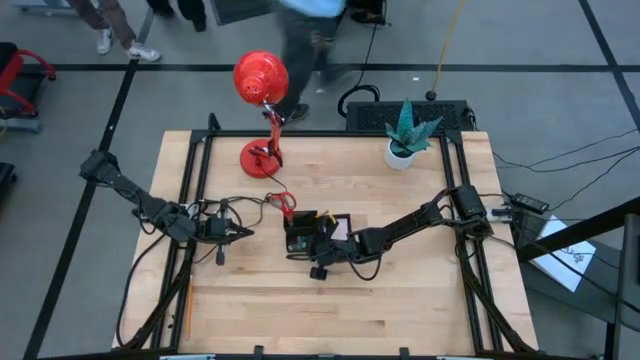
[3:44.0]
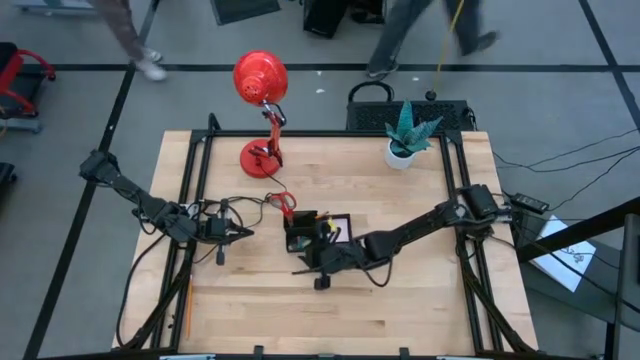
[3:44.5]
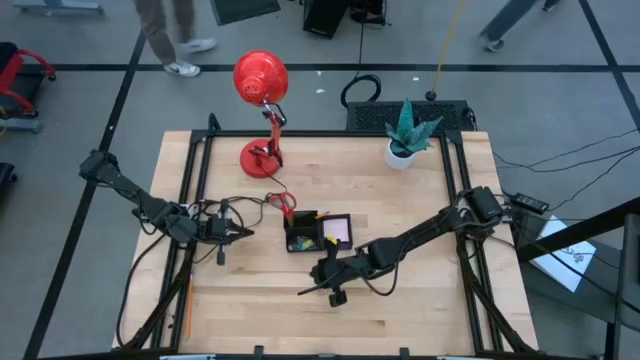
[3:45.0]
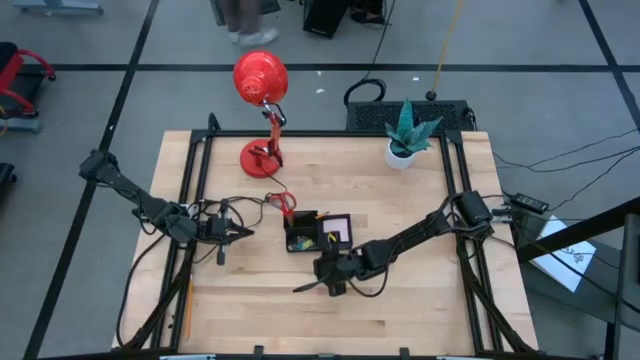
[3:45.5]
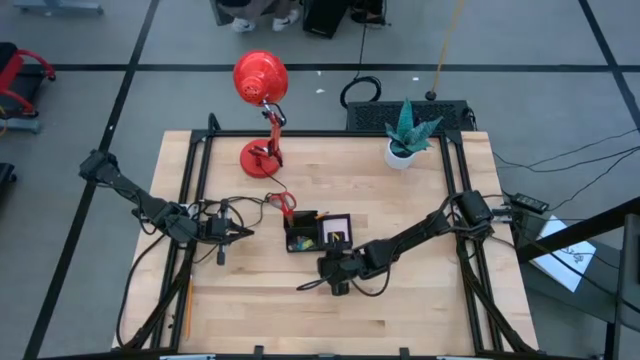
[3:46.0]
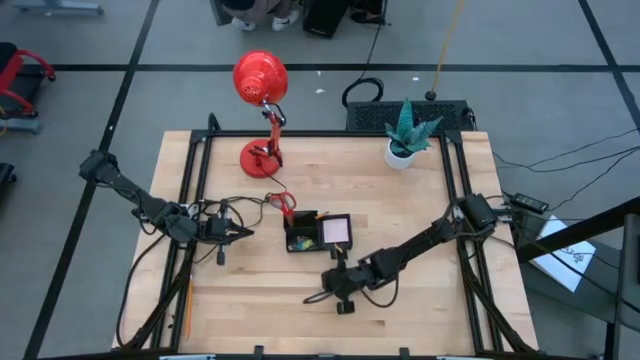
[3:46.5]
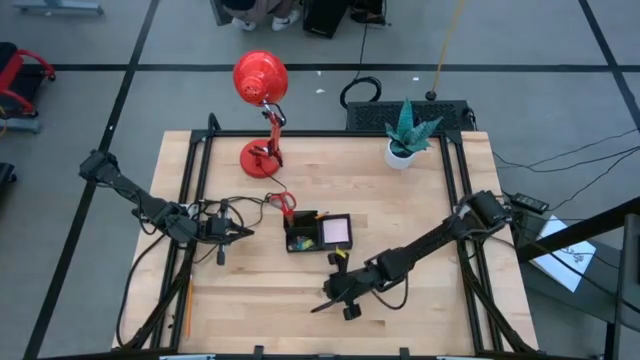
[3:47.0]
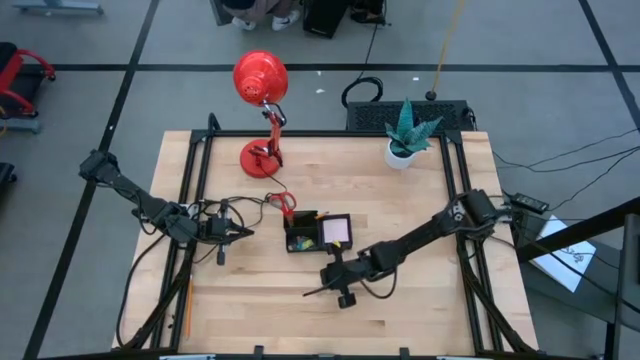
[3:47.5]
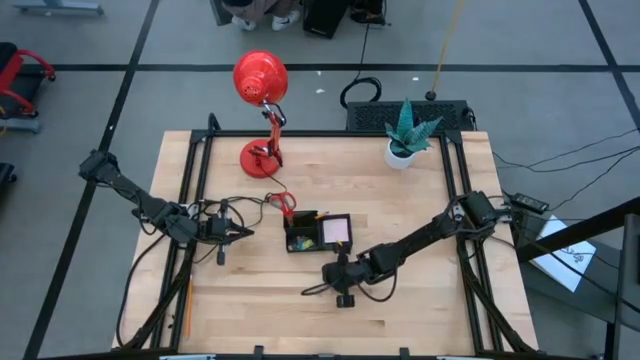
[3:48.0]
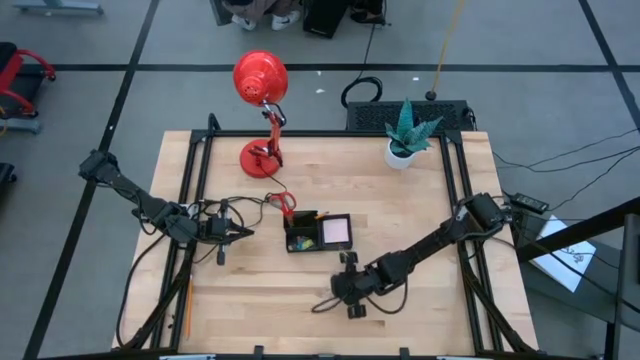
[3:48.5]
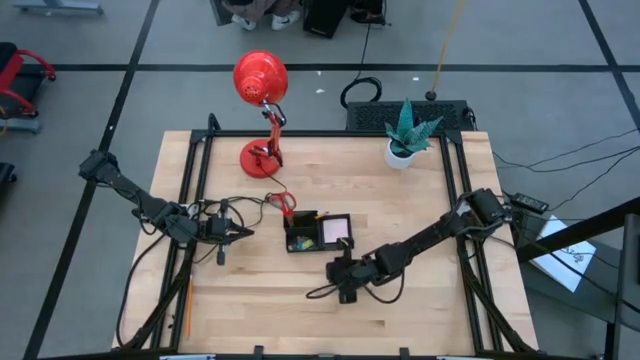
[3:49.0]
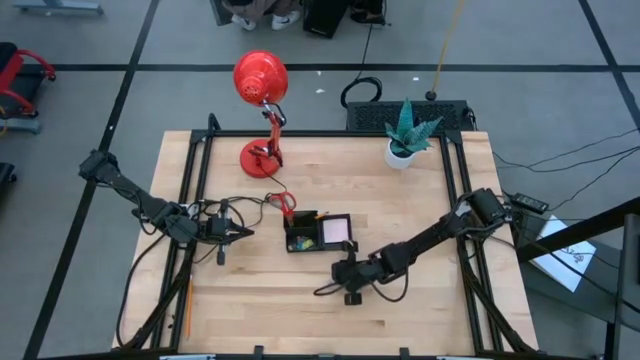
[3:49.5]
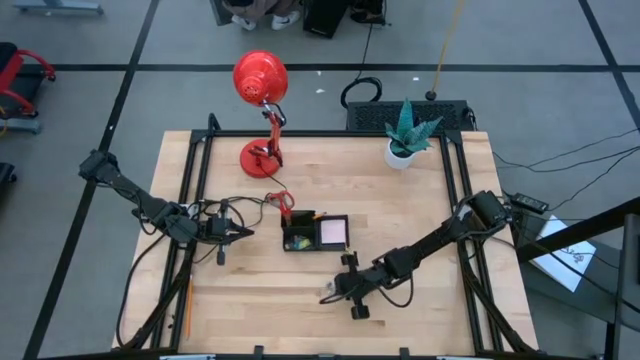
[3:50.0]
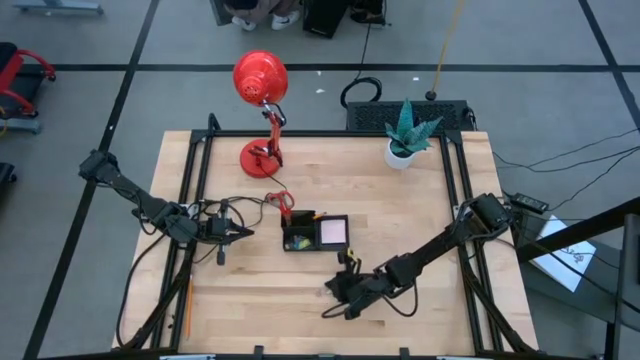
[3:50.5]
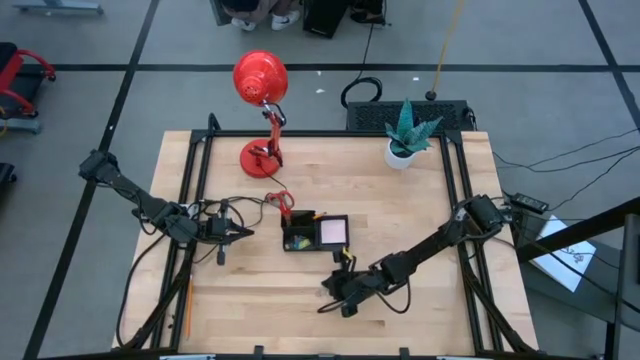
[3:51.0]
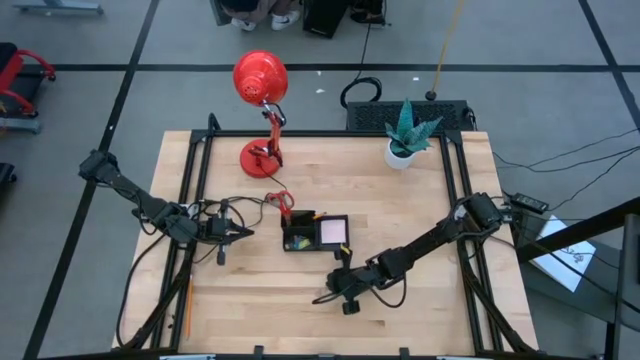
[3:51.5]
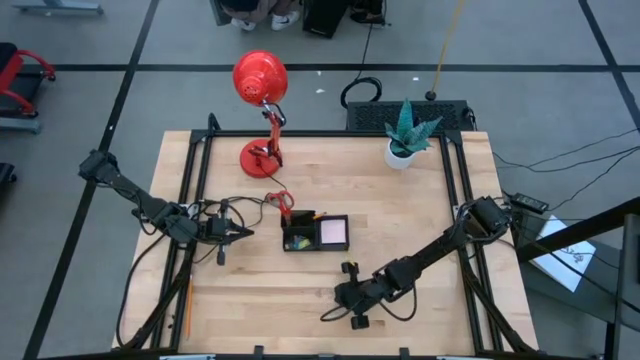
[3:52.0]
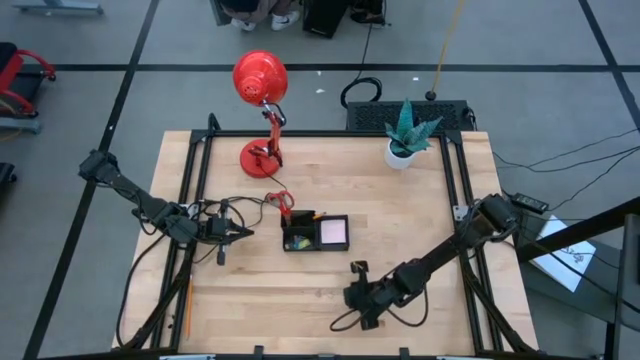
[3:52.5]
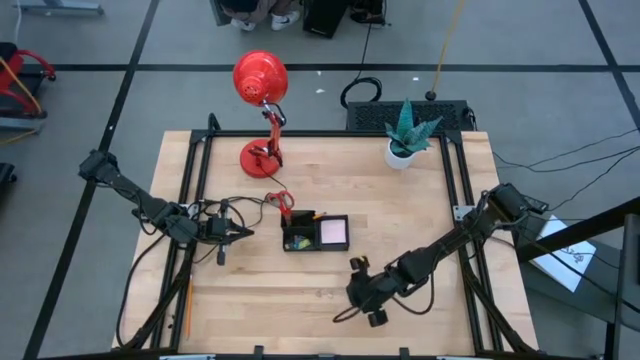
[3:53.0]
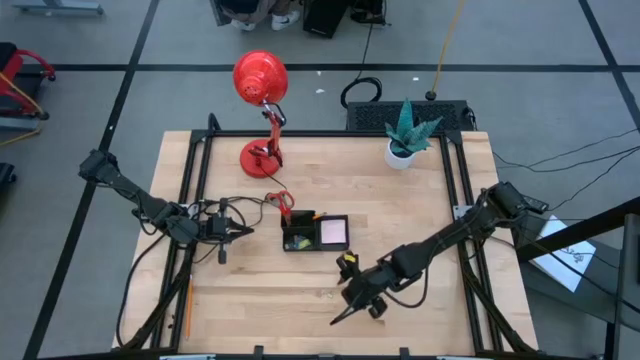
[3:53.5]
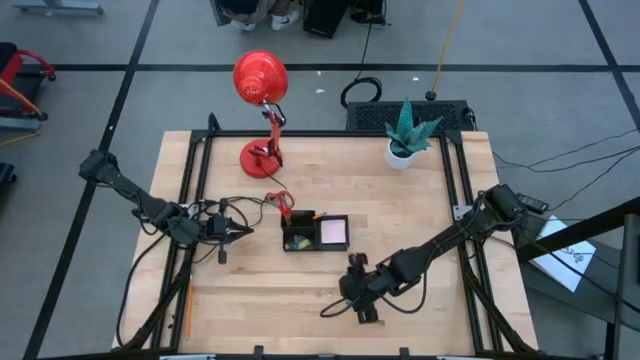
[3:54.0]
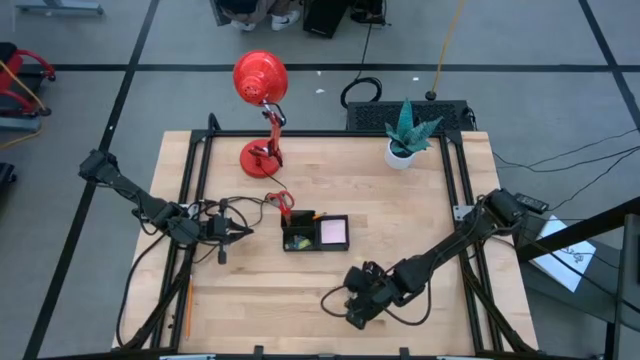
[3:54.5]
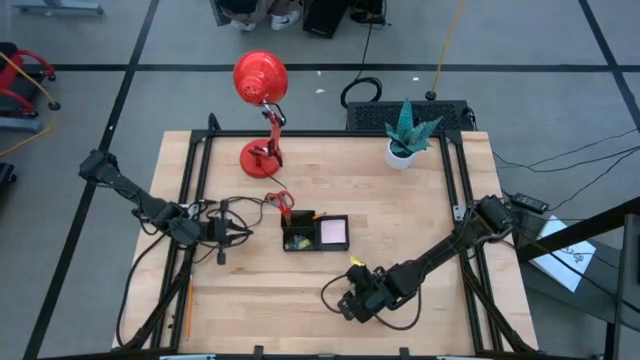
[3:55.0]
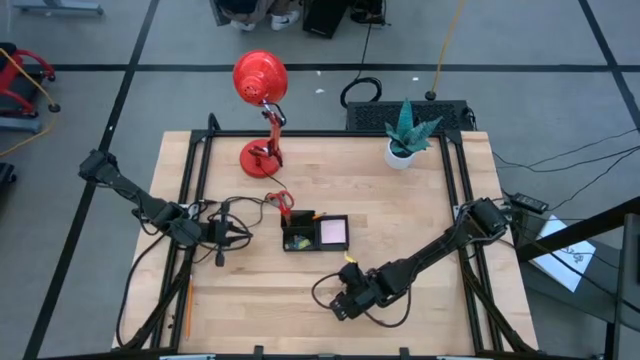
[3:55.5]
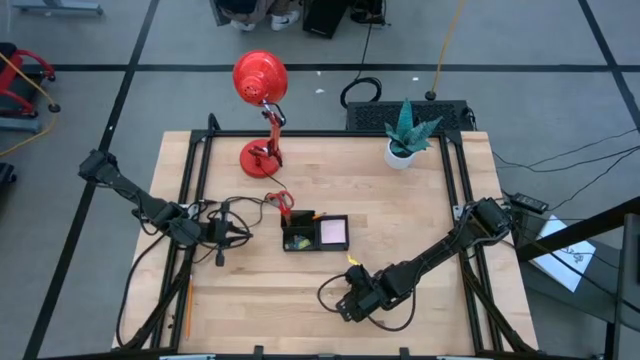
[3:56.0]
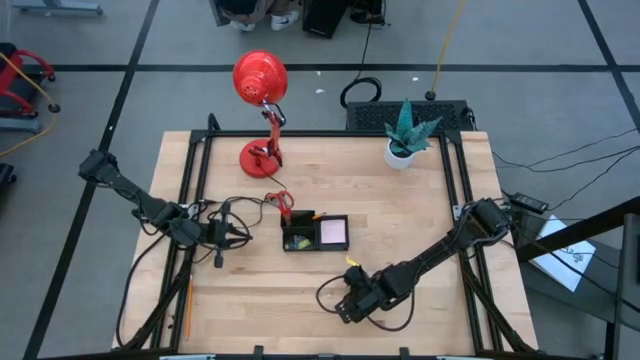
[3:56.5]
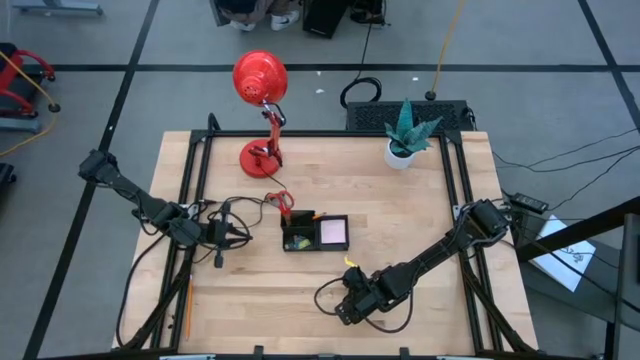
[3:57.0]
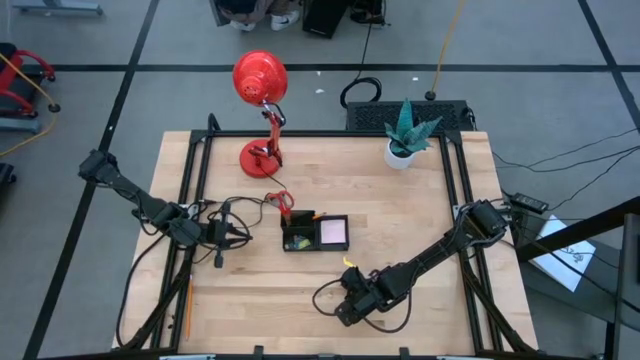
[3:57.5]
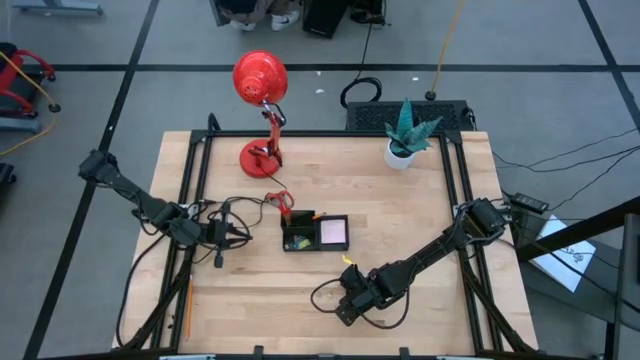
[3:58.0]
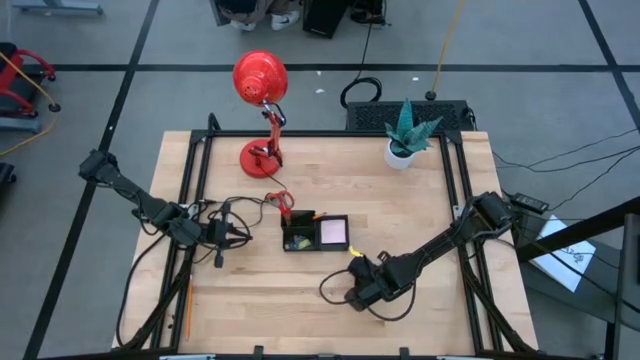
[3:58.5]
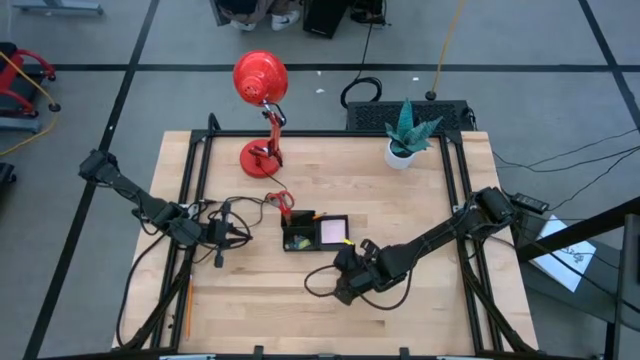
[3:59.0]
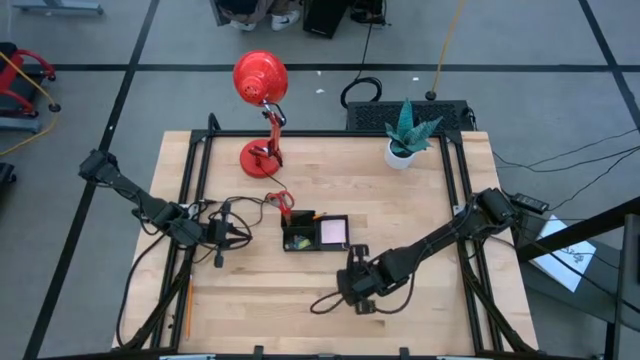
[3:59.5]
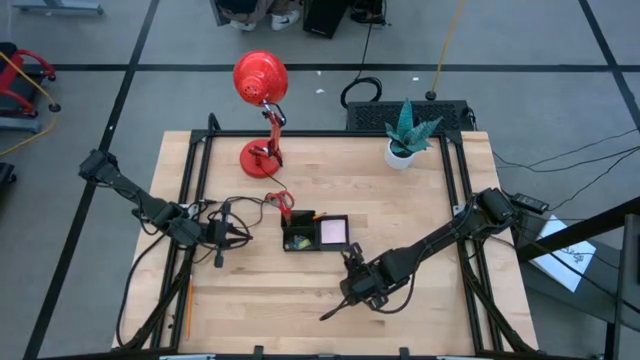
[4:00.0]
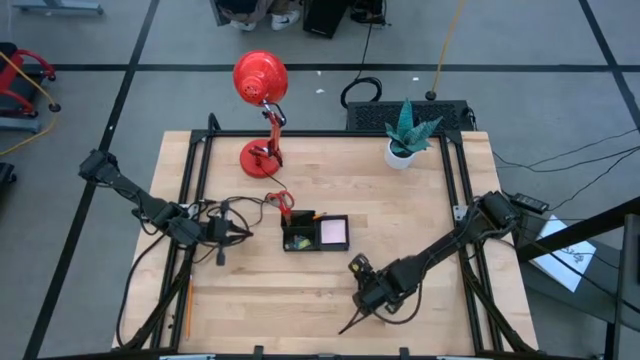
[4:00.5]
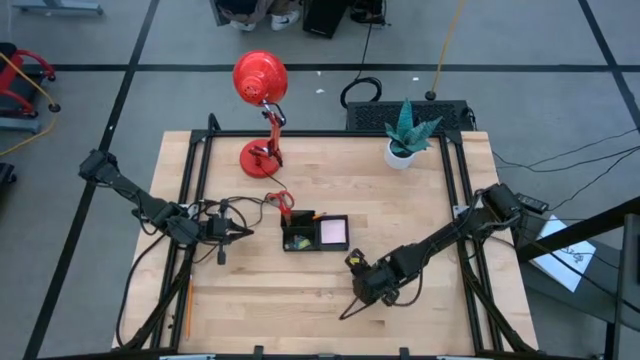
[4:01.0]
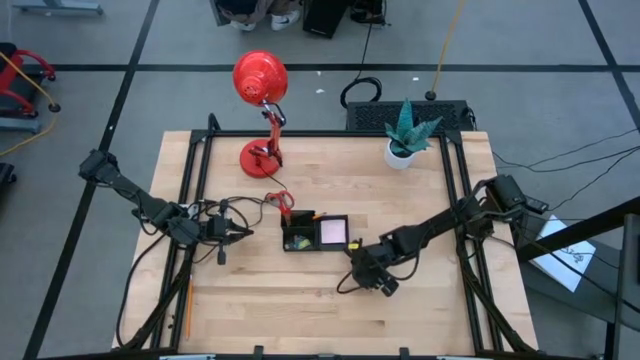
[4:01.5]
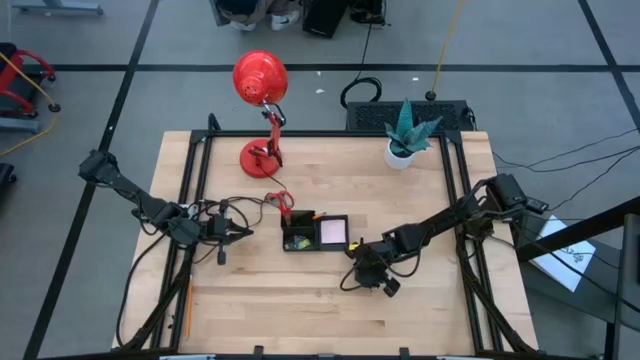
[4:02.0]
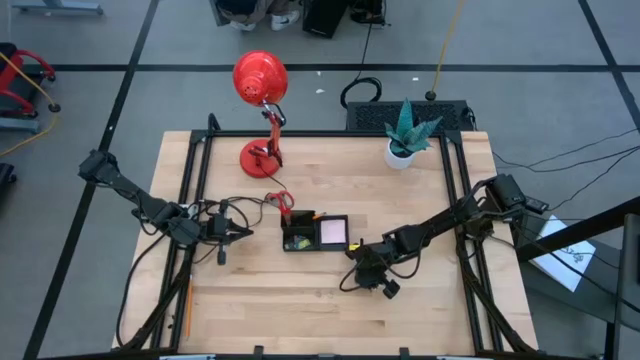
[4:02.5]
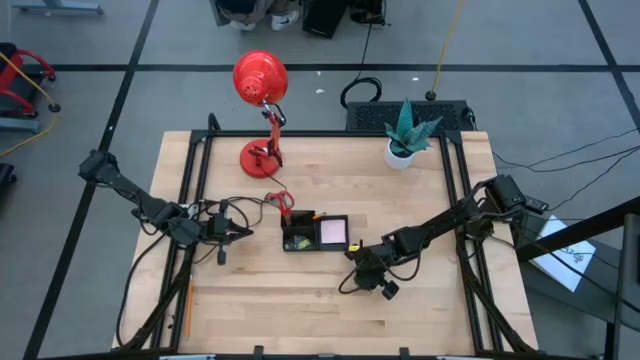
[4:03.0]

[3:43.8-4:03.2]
Task: Pick and place office supplies into organizer
Put the blue binder clip into the black desk organizer

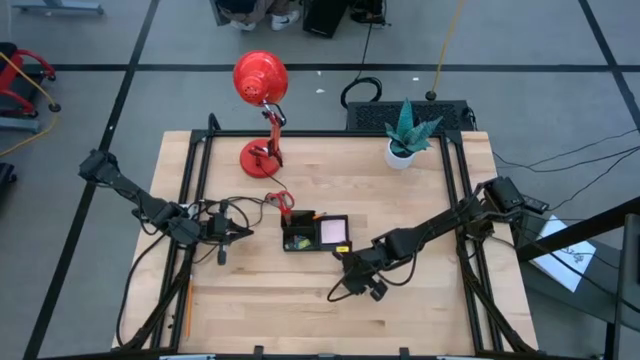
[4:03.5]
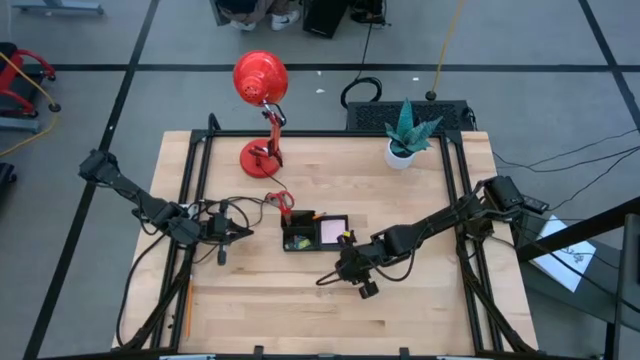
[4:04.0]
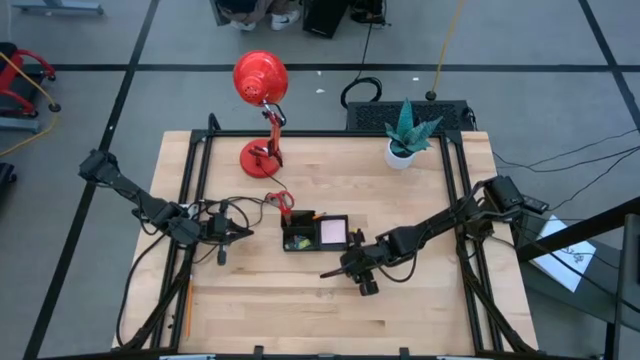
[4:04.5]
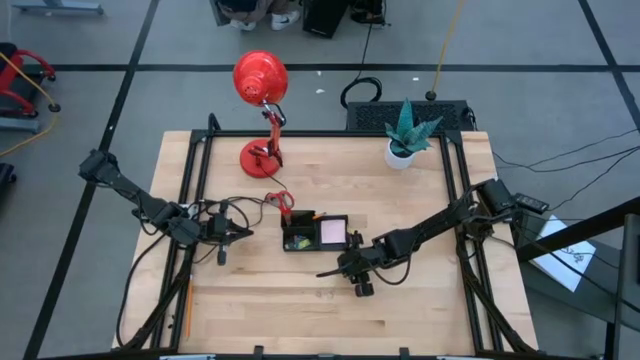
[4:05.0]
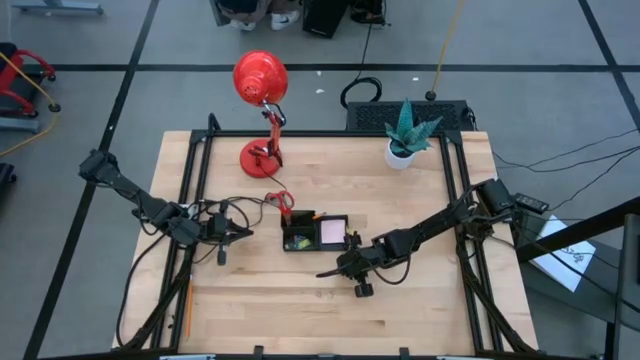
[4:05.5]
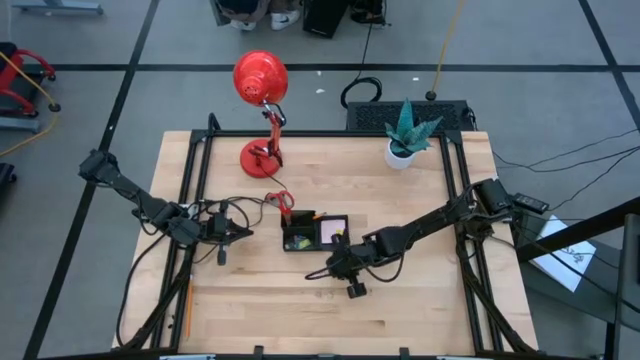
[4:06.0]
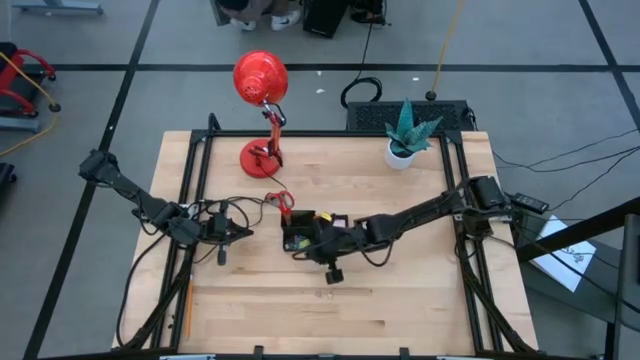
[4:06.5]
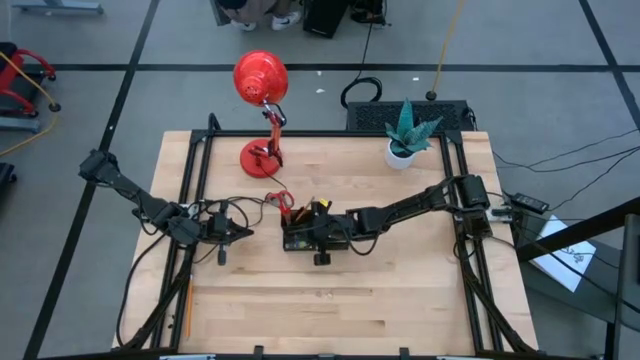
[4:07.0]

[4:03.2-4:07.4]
Put the blue binder clip into the black desk organizer
